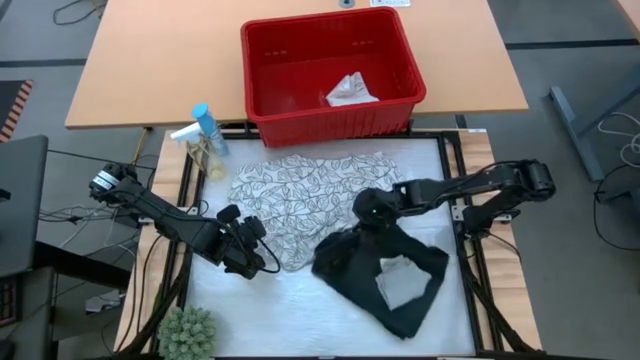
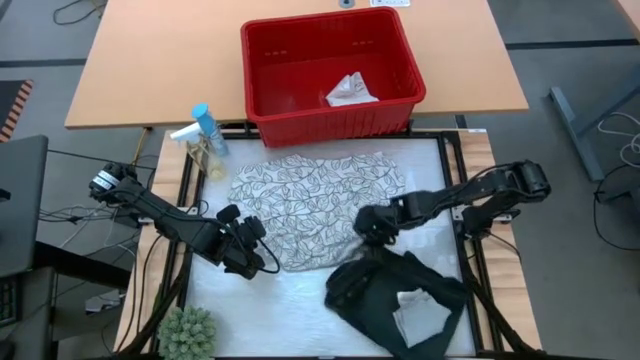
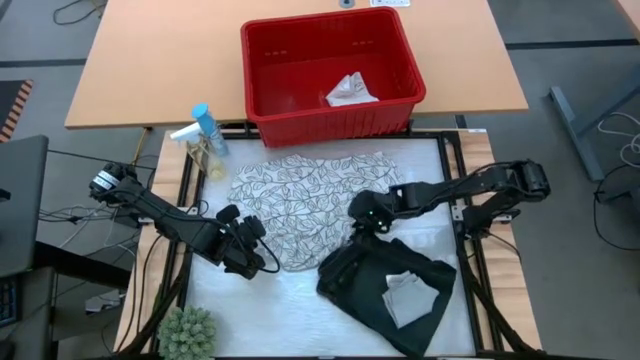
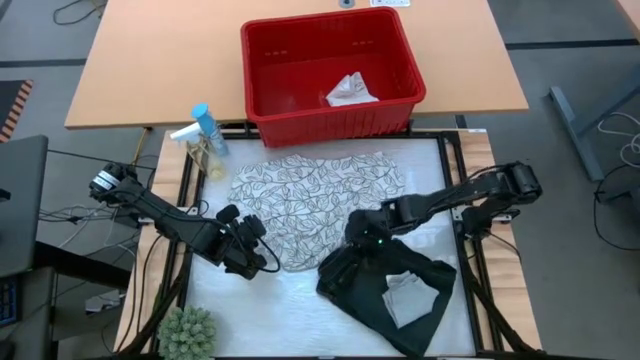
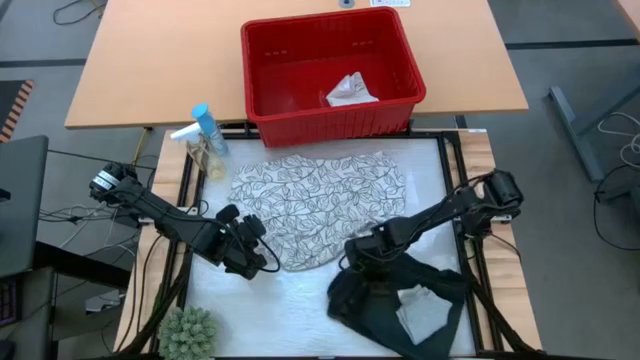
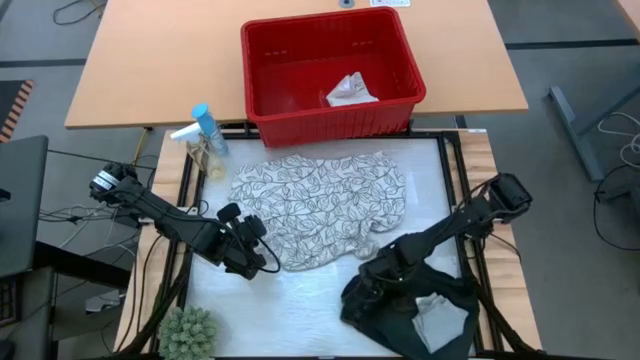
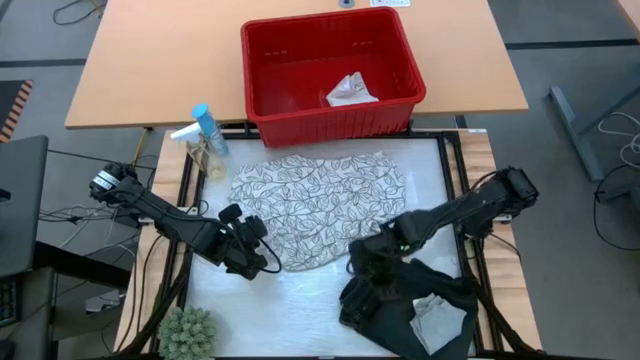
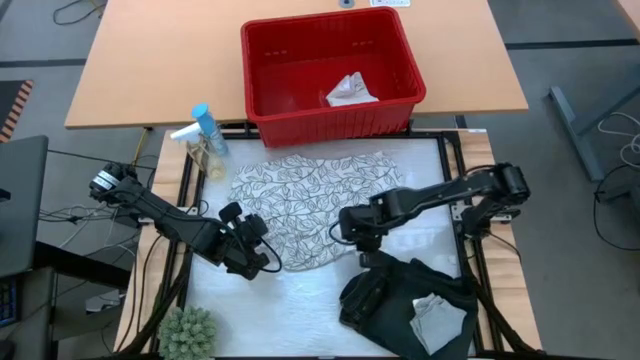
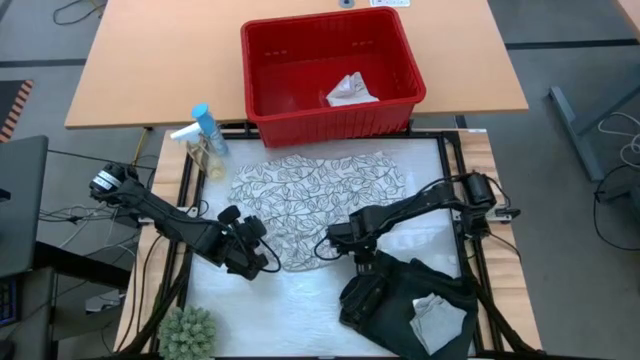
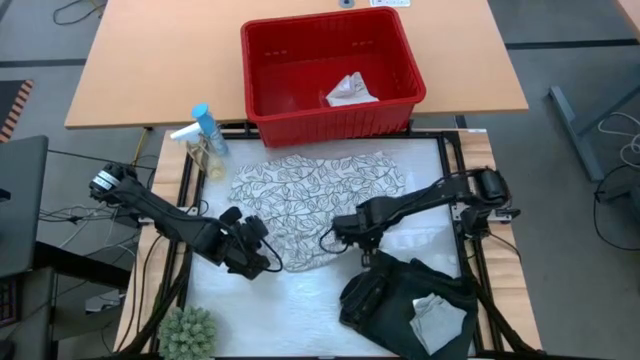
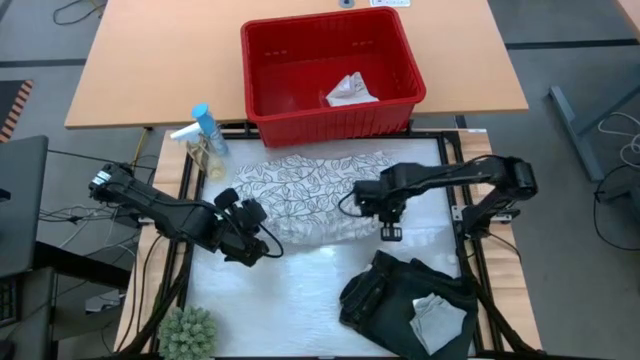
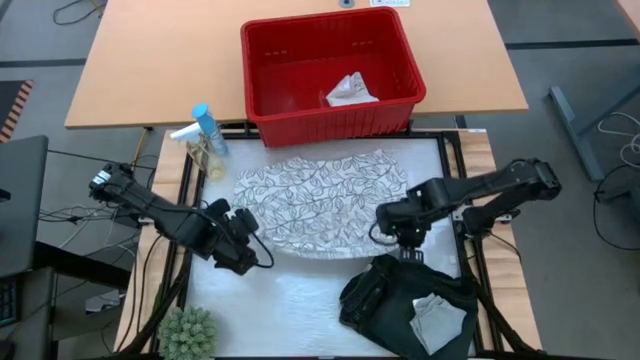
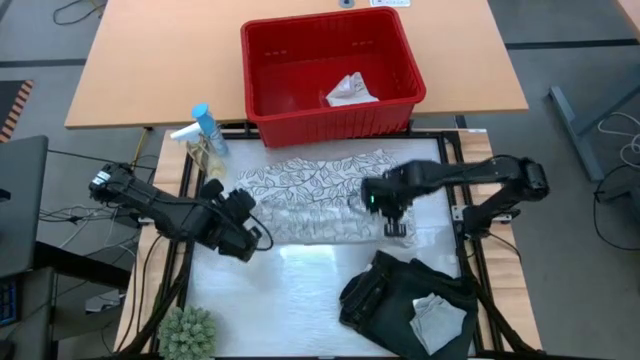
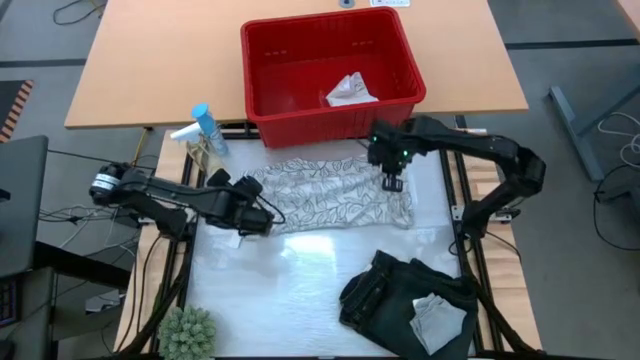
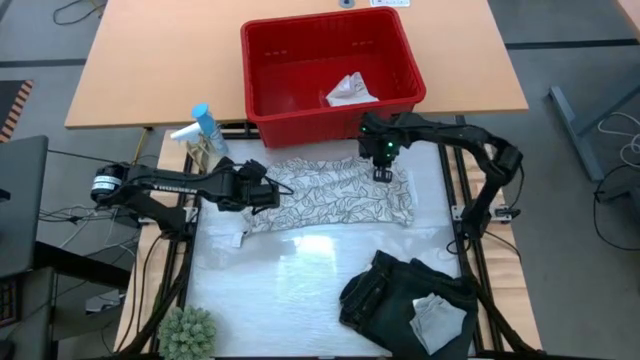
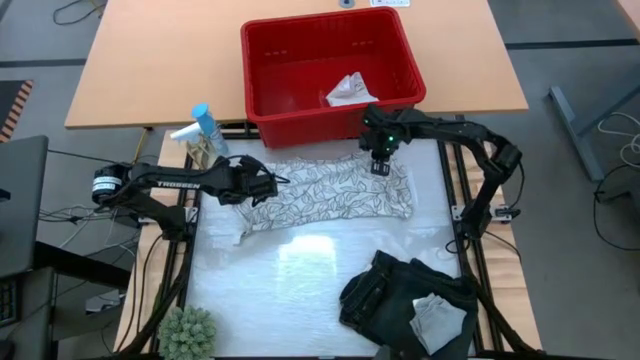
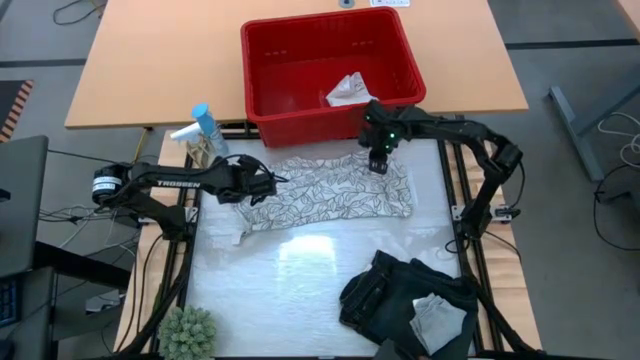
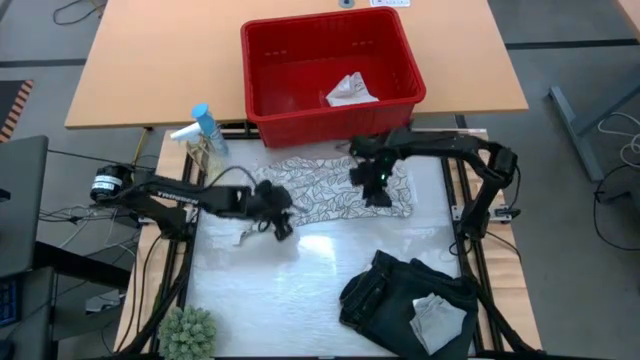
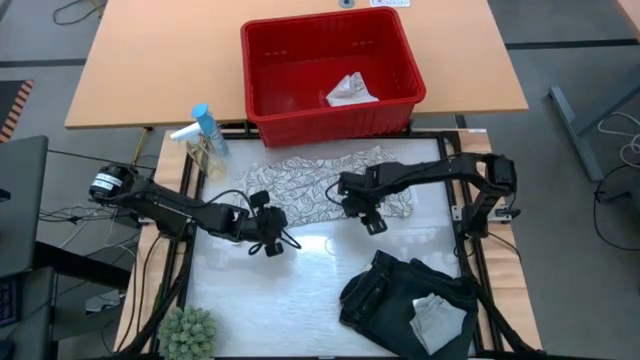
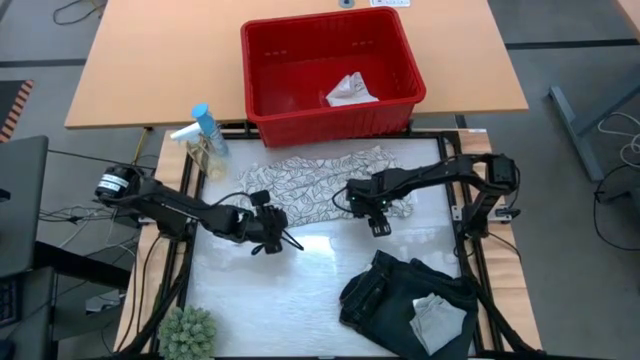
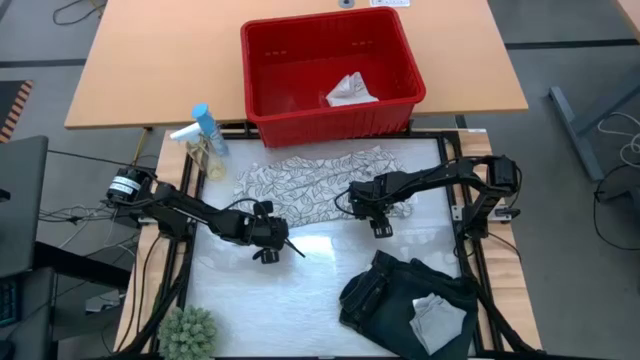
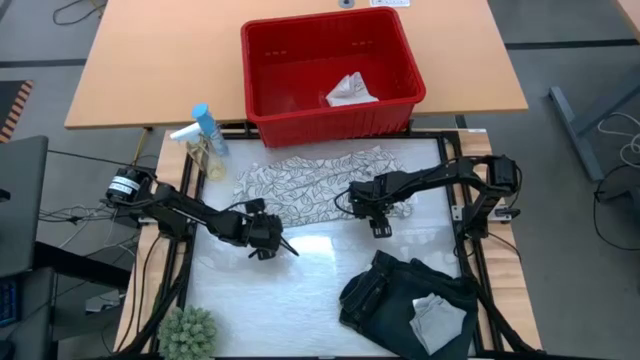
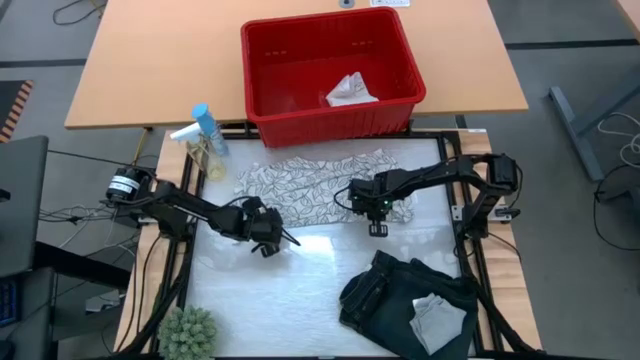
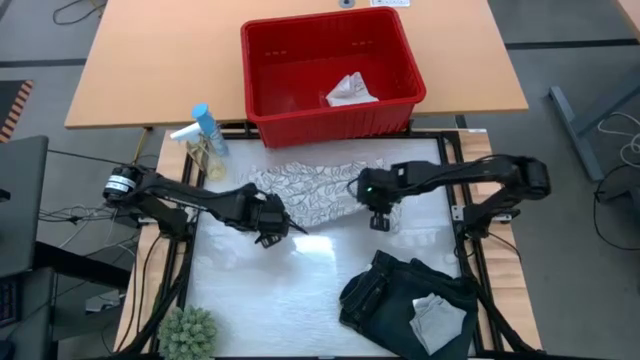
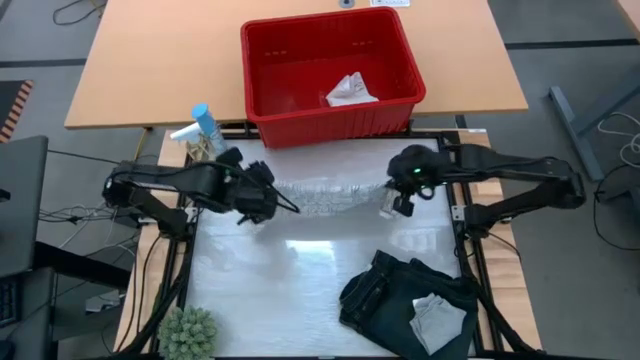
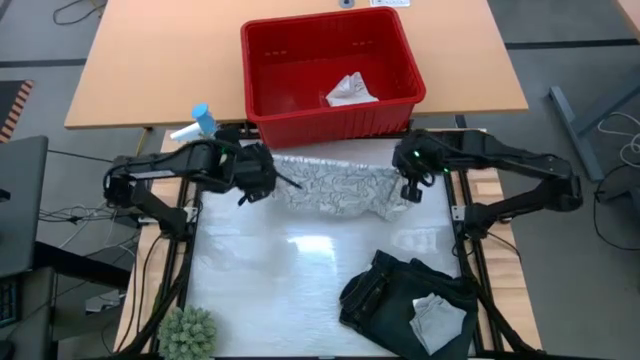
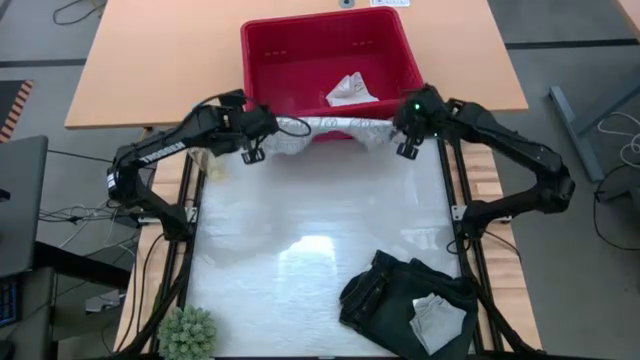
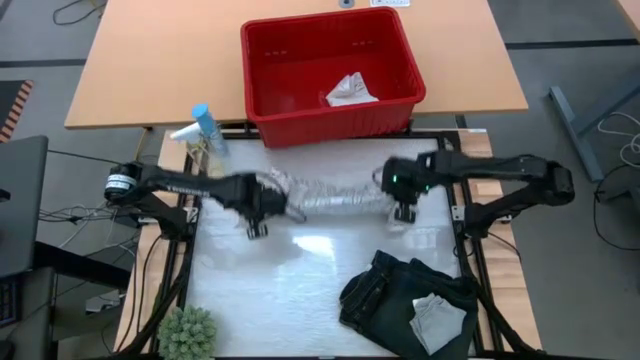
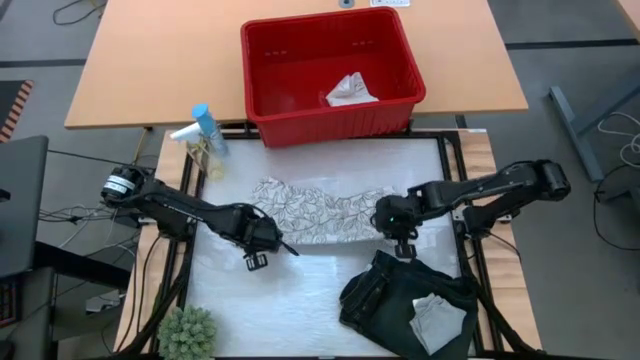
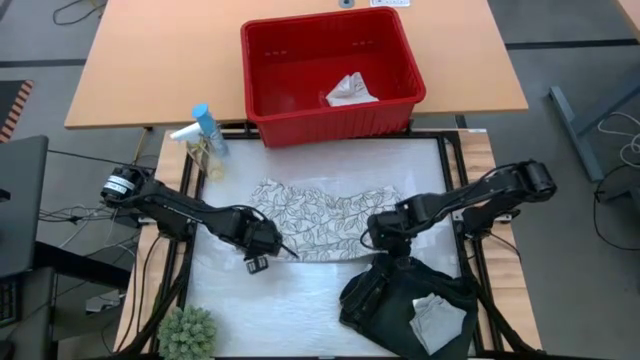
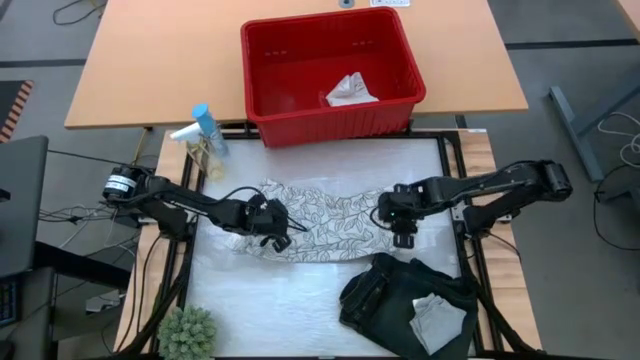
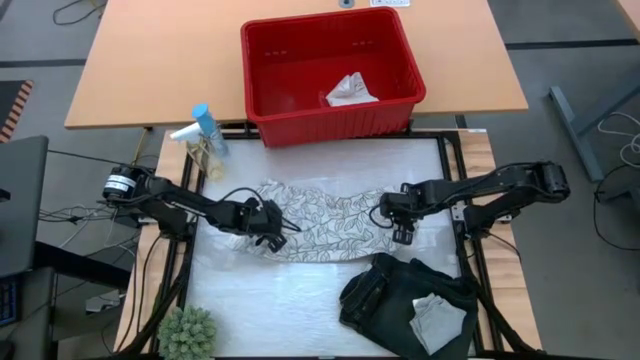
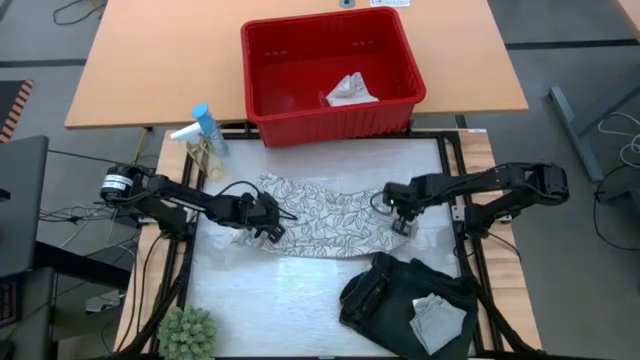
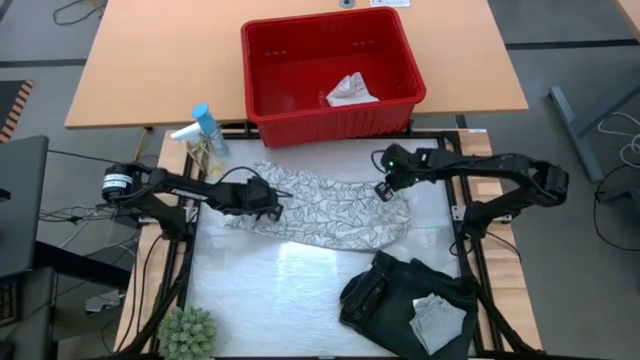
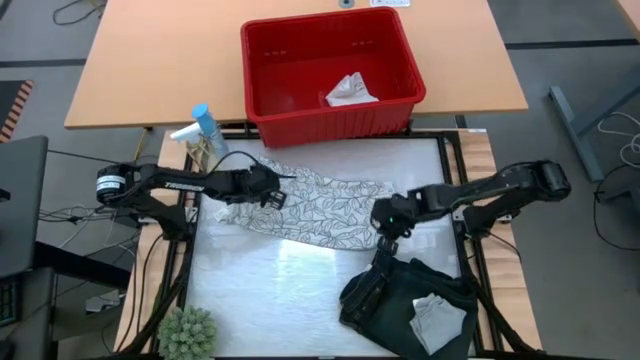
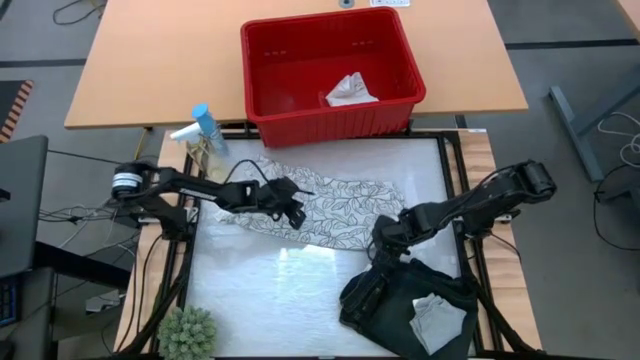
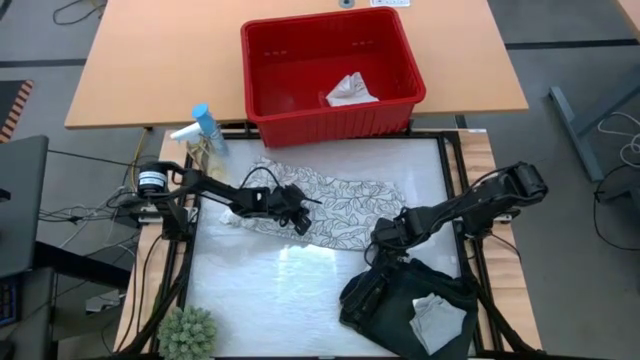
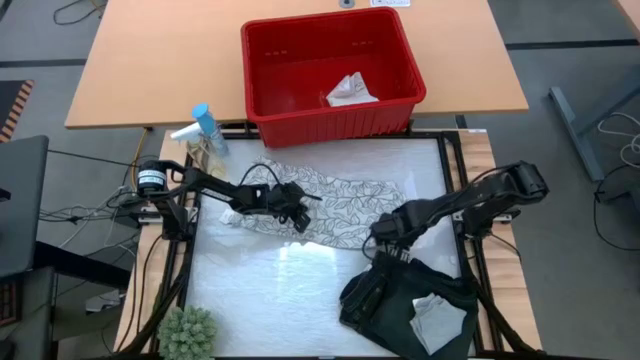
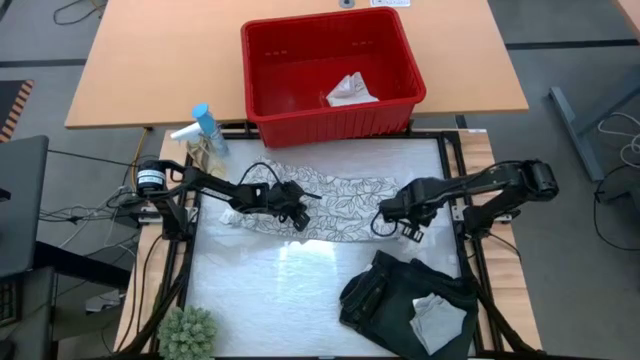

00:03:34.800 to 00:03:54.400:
Task: Fold Laundry from Bin
Fold the white from the red laundry bin

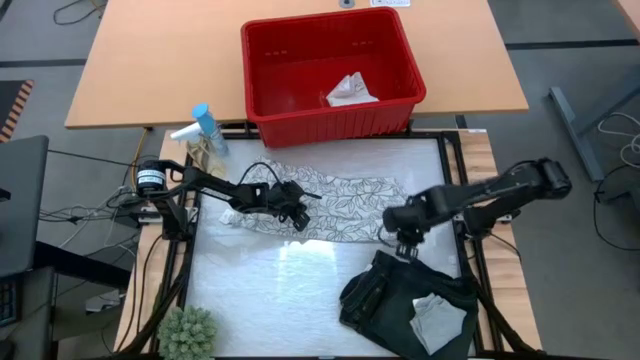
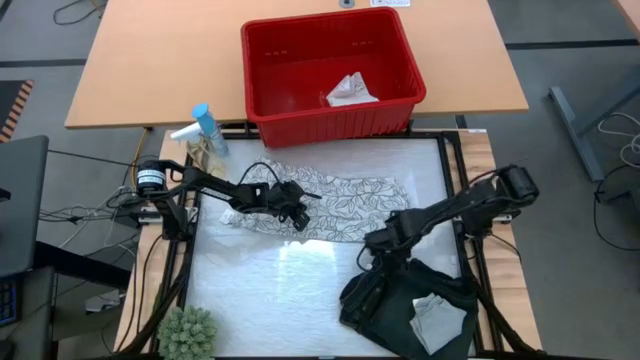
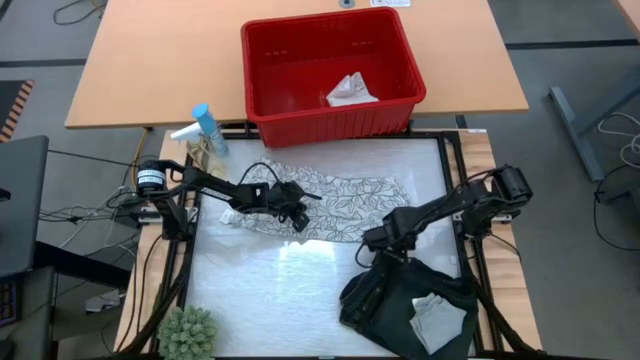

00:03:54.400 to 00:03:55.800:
Fold the white from the red laundry bin
